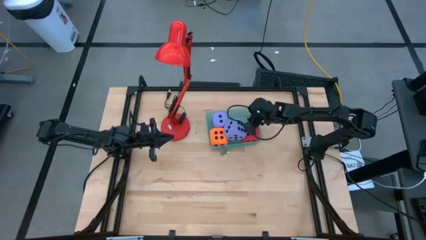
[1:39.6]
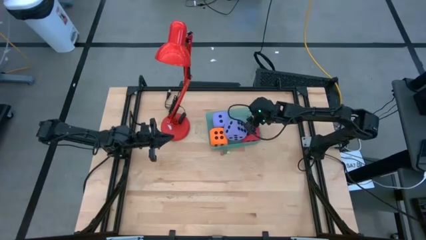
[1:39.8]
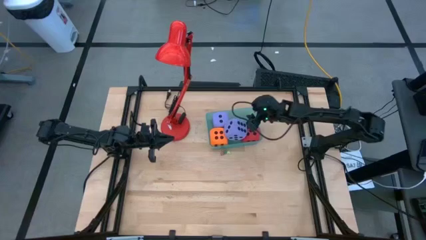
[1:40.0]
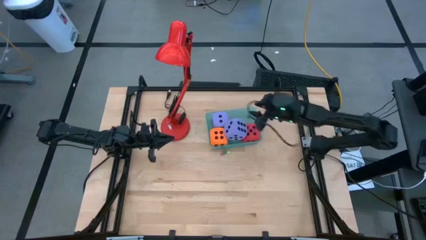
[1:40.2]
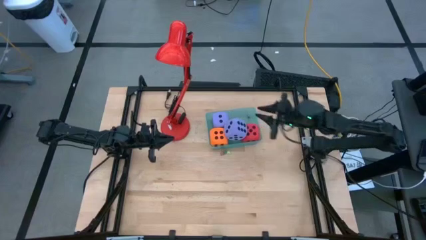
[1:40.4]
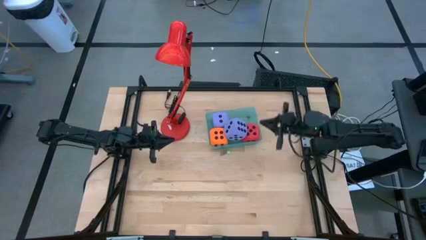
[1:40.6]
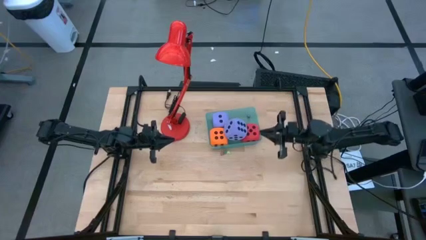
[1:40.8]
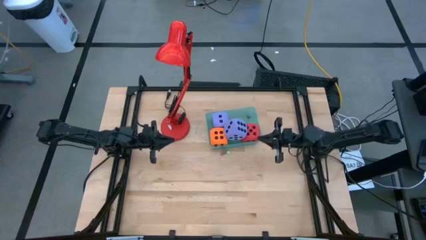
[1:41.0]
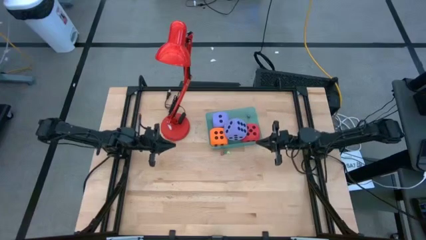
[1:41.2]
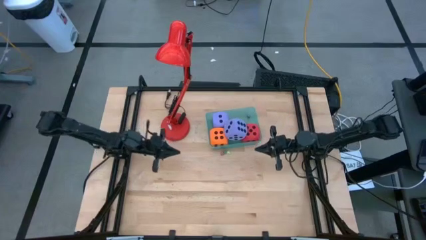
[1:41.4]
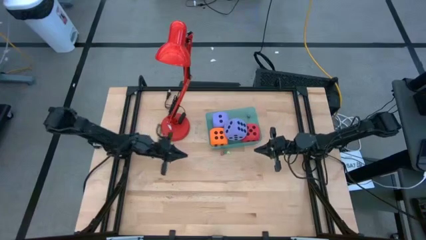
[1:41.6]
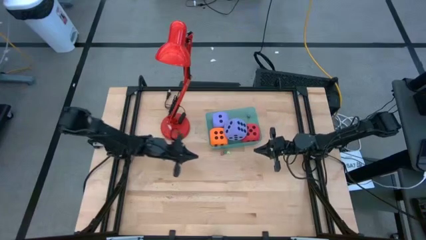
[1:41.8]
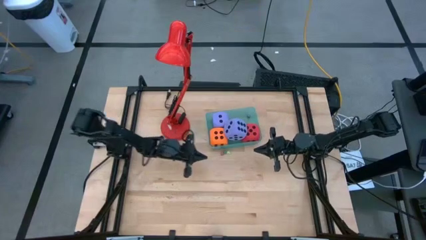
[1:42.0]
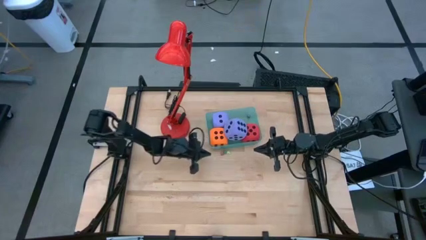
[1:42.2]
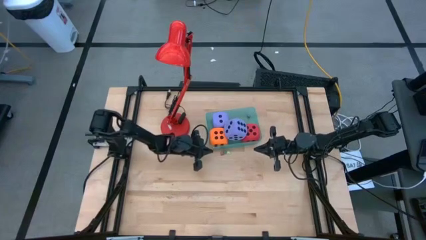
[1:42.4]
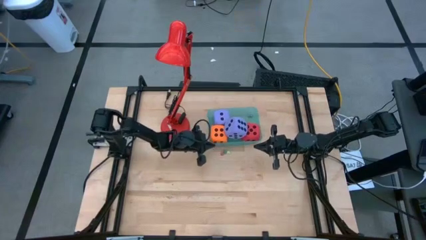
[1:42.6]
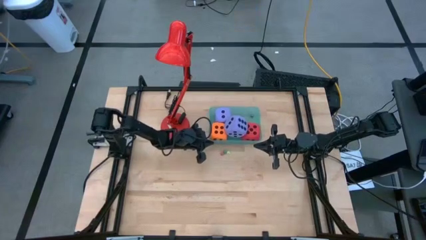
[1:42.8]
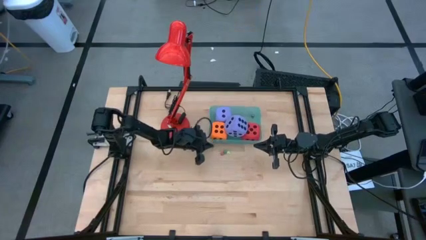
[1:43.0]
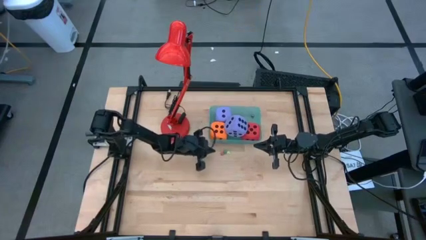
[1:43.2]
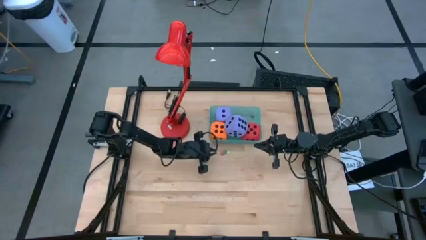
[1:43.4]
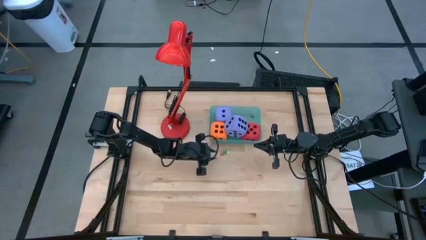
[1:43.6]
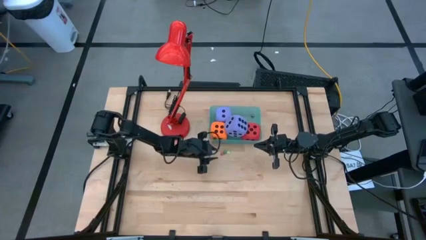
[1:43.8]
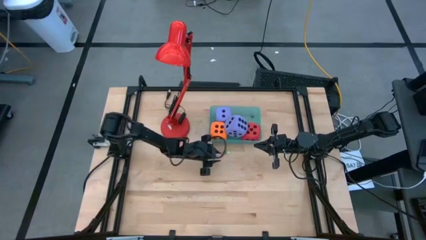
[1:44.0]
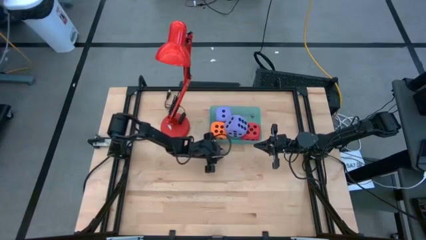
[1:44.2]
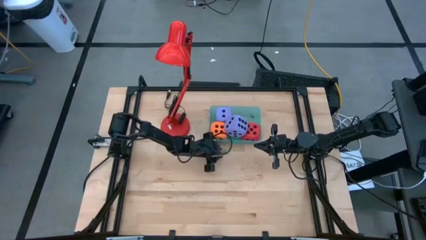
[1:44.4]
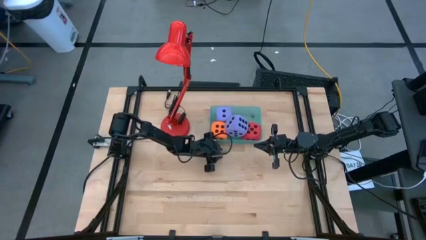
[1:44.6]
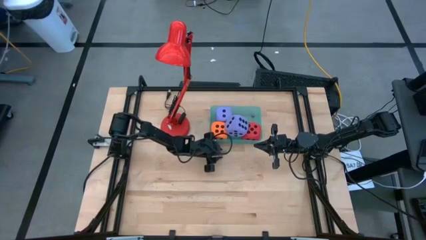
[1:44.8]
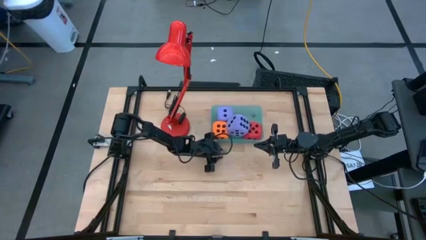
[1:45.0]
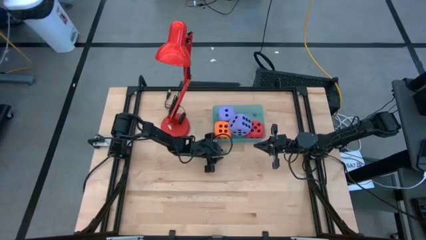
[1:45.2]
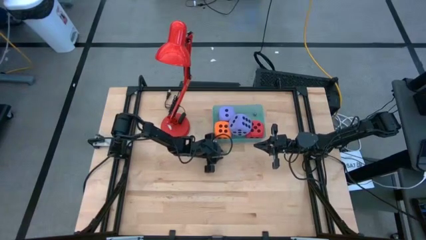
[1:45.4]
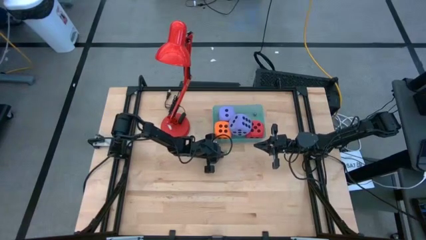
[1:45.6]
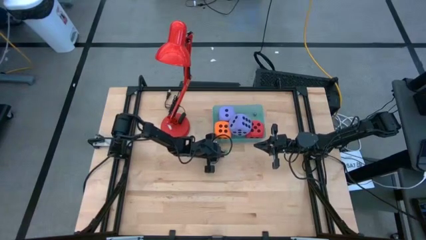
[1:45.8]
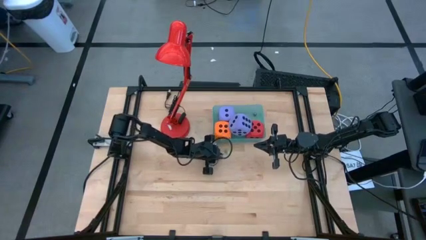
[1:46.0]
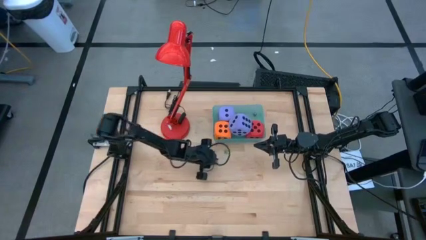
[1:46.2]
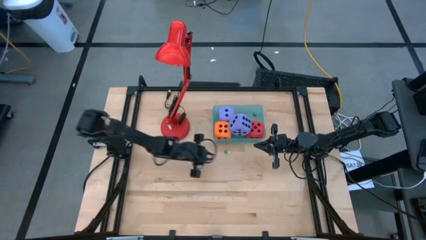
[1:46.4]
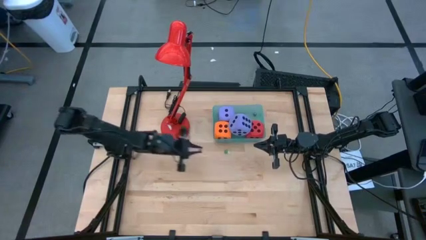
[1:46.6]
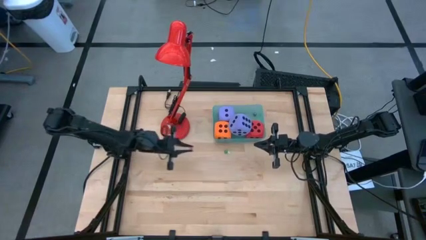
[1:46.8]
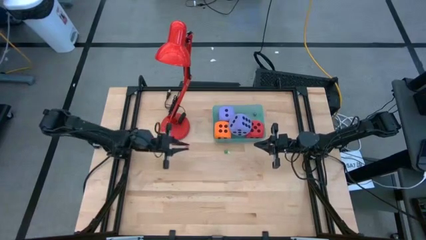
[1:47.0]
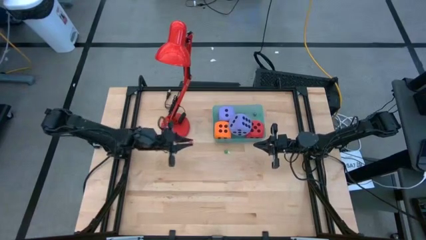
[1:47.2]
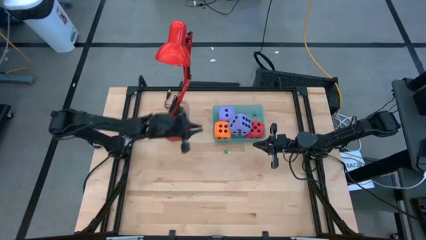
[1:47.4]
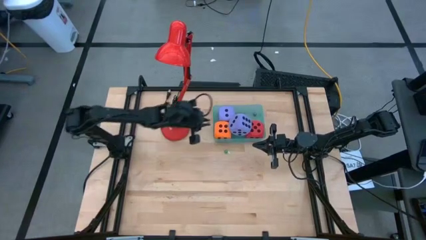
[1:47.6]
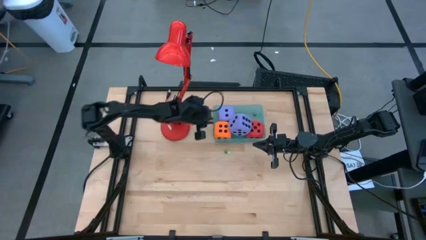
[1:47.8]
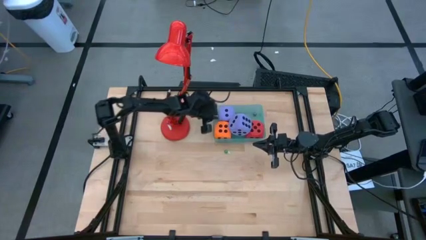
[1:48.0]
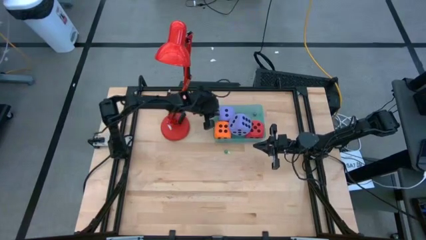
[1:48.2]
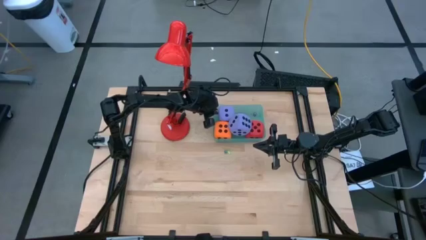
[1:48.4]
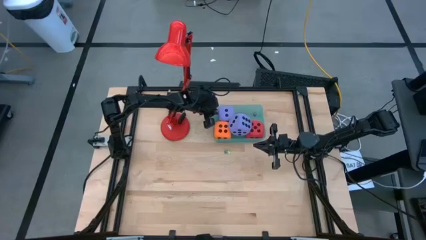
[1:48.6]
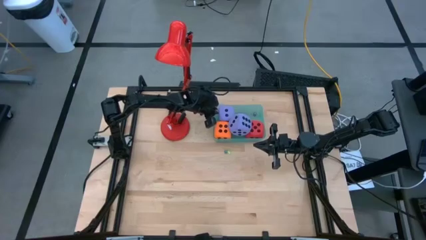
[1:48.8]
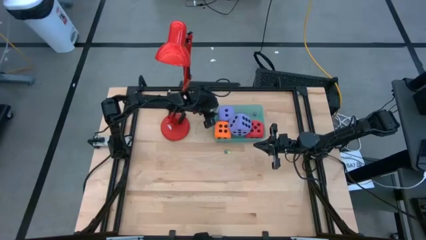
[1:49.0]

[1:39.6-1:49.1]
Task: Pick & Place Dice
Put the small red dice into the bin

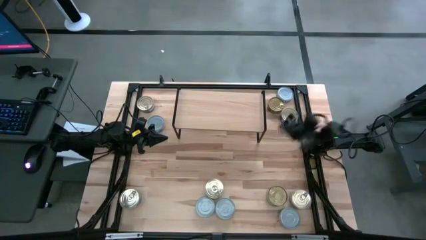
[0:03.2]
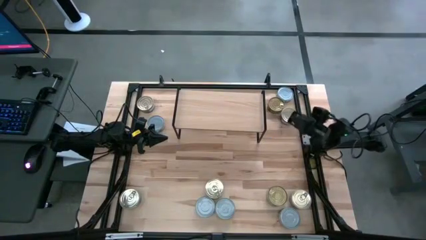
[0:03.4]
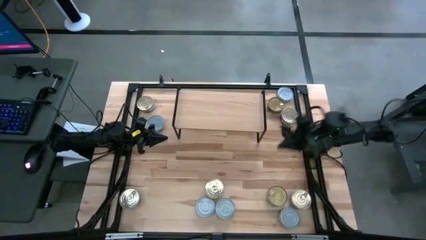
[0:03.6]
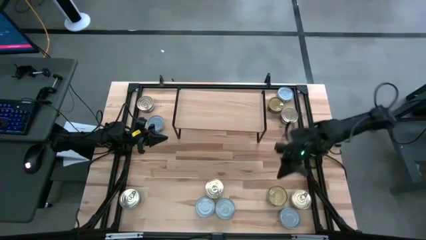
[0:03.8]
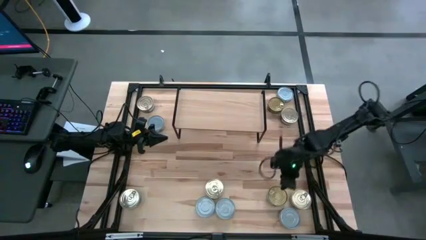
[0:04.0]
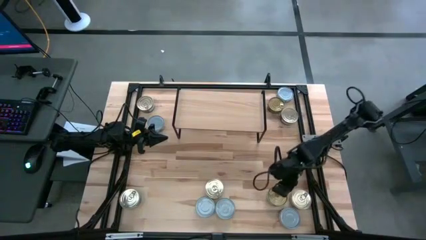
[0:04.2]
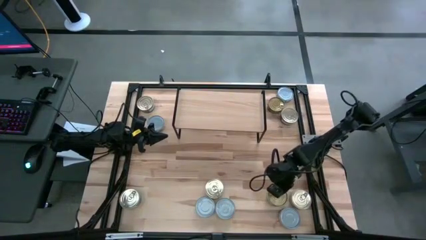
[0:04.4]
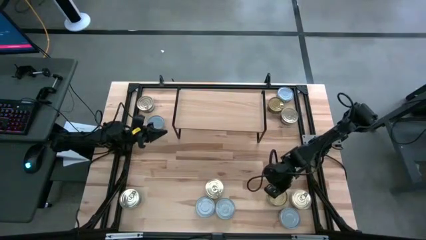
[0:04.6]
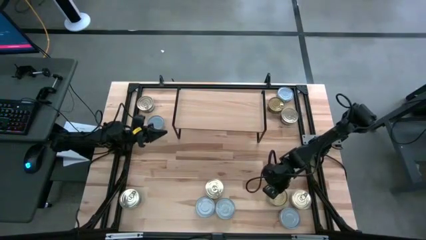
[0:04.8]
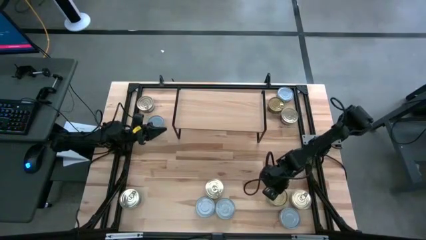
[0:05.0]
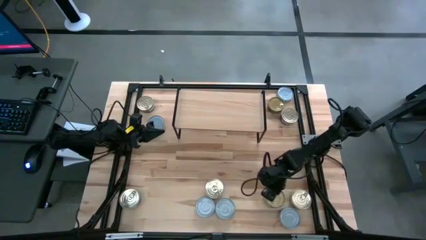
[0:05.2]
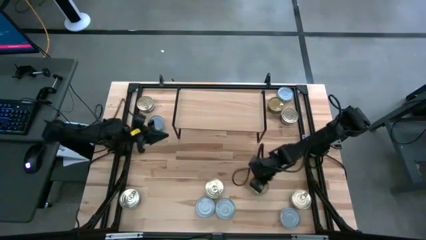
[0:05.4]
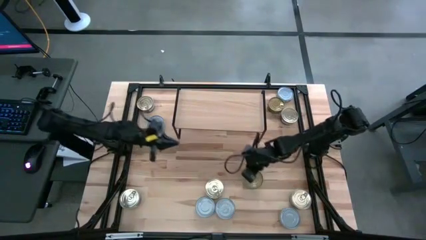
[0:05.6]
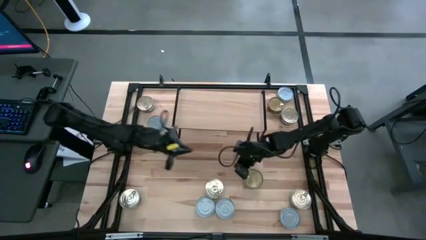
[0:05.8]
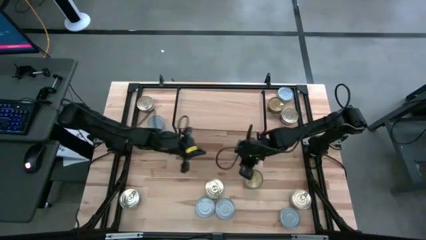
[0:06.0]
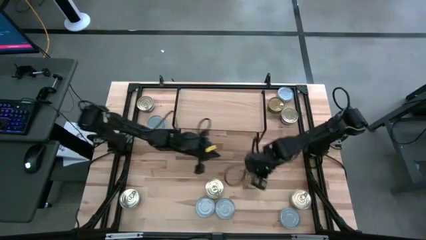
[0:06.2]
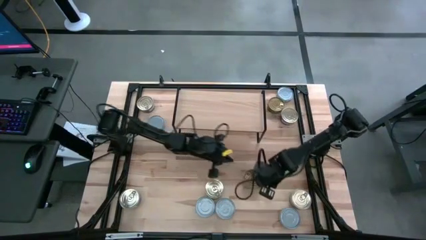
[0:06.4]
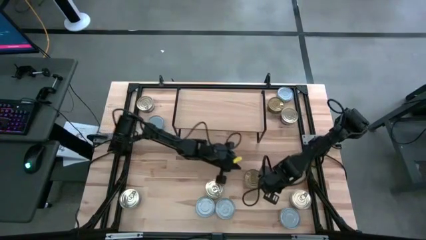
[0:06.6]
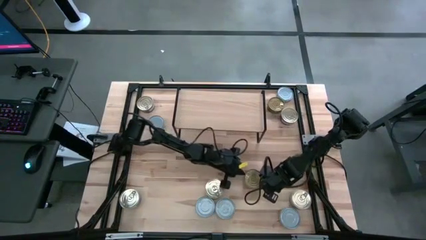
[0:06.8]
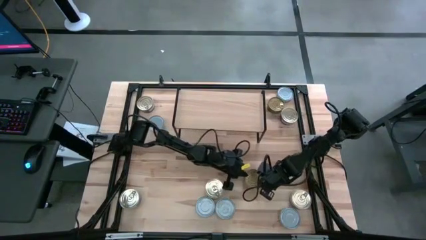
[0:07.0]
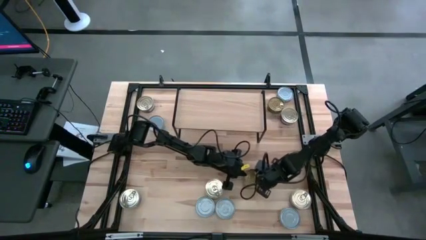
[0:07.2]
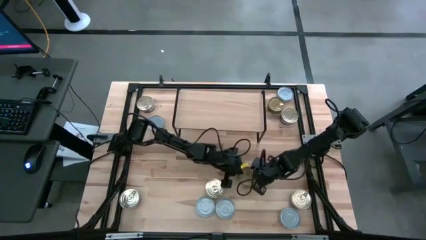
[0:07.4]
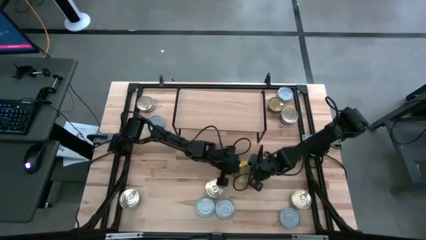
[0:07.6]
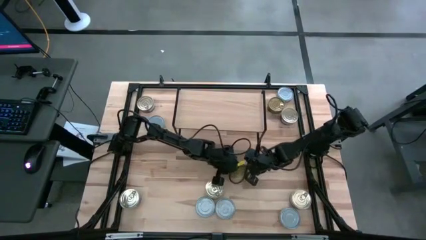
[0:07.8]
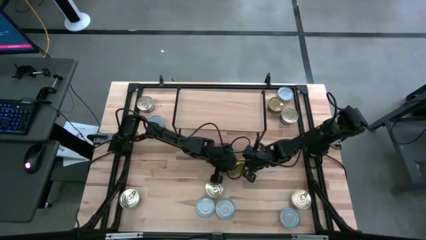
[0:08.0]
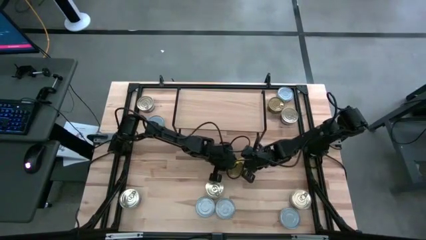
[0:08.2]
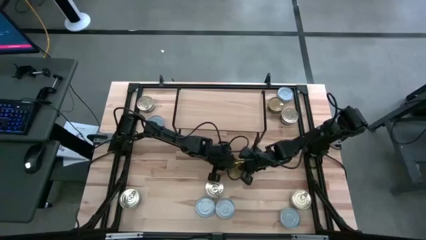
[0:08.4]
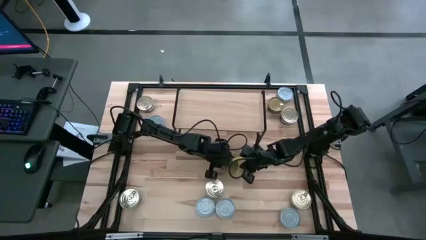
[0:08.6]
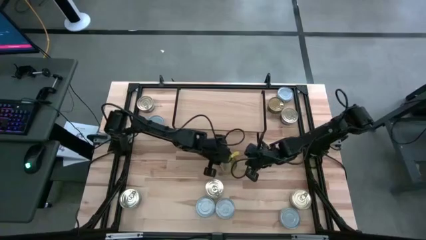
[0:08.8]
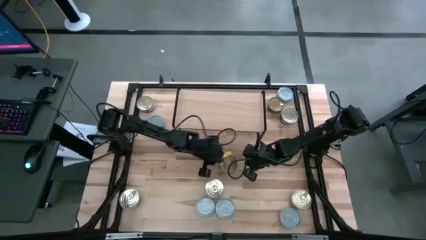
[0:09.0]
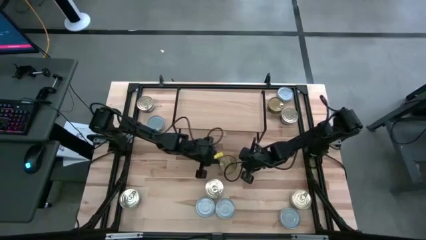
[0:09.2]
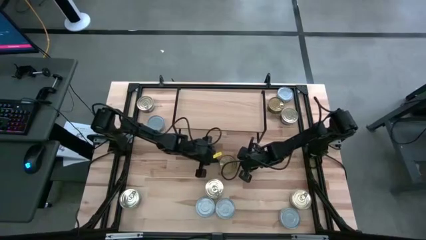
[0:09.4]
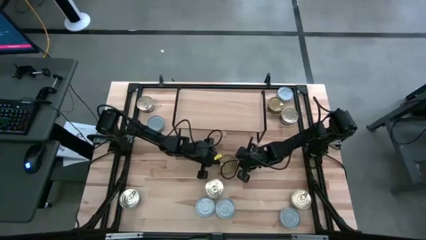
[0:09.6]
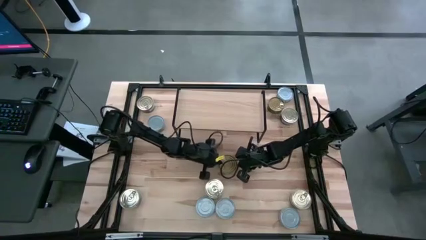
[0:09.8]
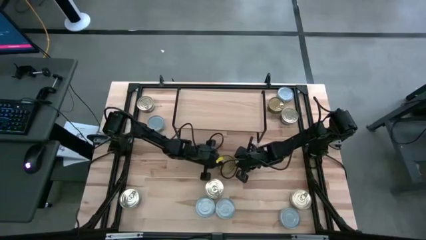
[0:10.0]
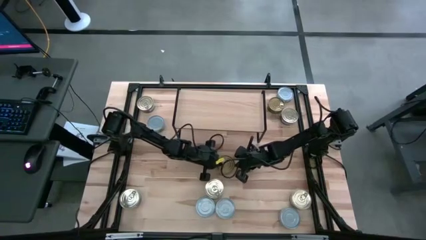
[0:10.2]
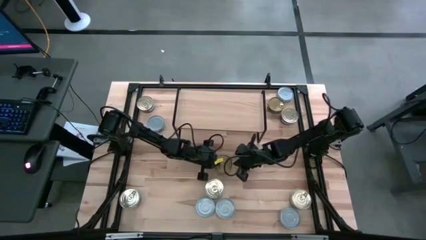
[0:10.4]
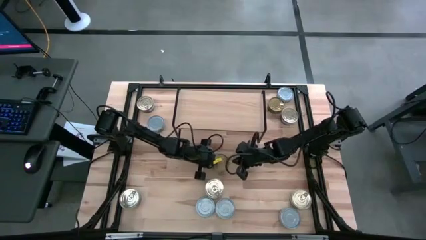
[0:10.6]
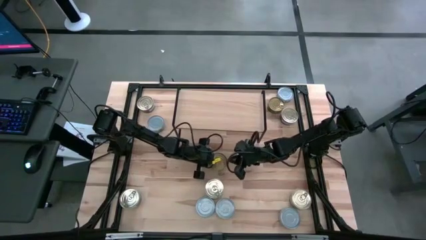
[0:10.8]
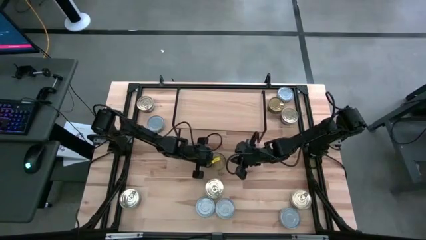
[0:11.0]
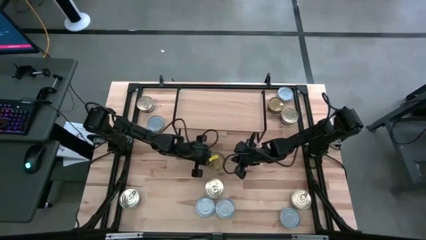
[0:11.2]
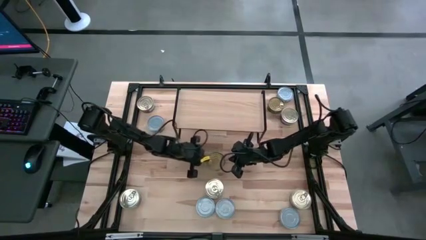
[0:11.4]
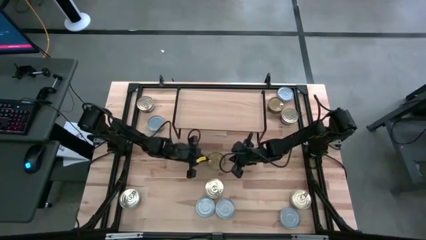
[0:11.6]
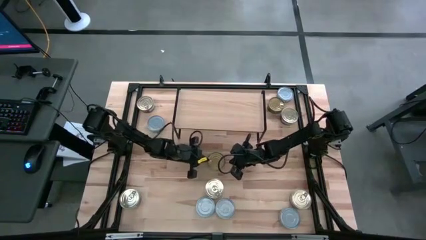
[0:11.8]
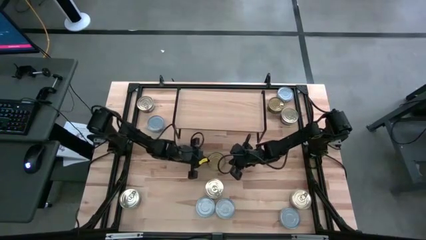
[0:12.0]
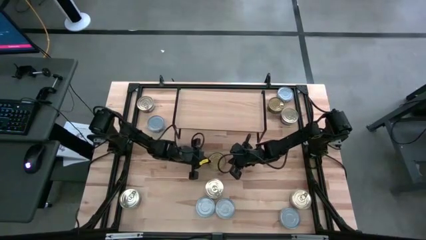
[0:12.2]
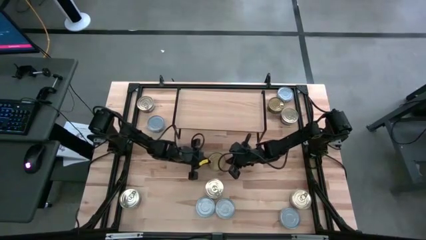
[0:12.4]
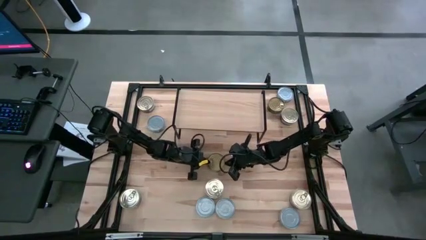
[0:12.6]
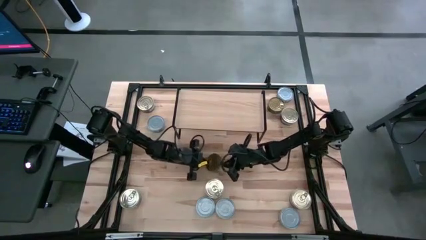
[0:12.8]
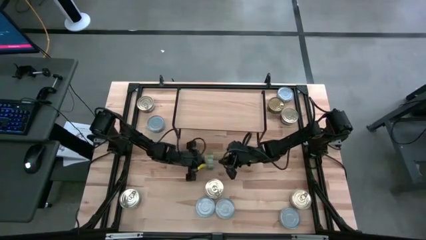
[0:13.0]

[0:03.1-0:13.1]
Task: Stack canned seafood by type on shelf
Put the green tuna can on the shelf
